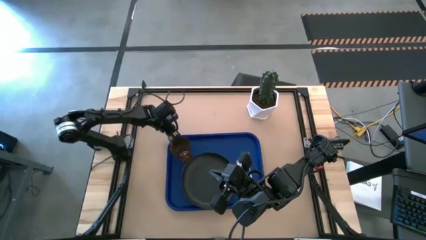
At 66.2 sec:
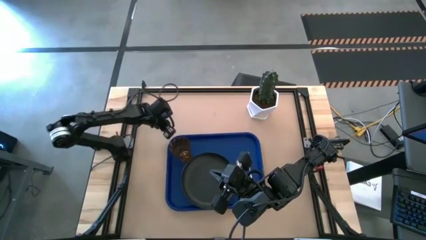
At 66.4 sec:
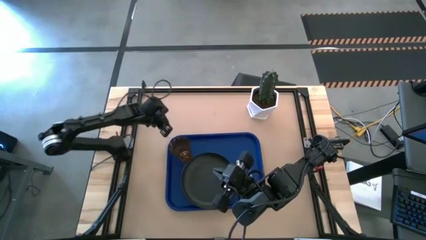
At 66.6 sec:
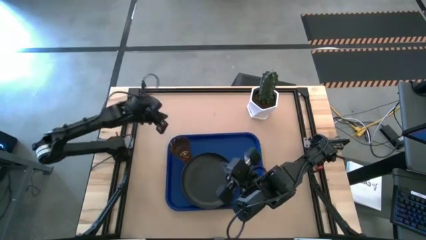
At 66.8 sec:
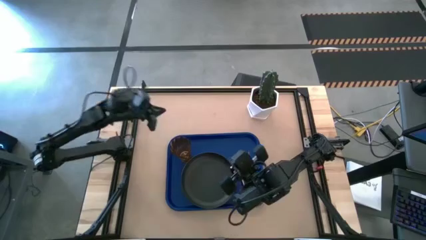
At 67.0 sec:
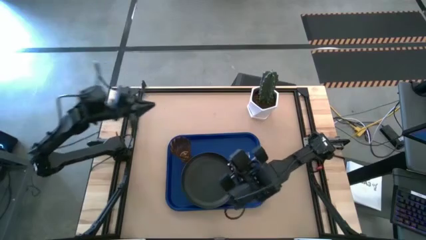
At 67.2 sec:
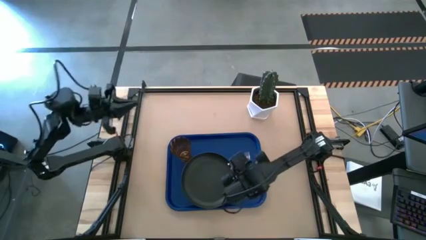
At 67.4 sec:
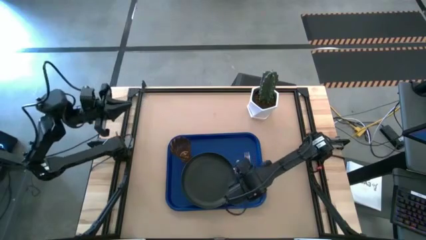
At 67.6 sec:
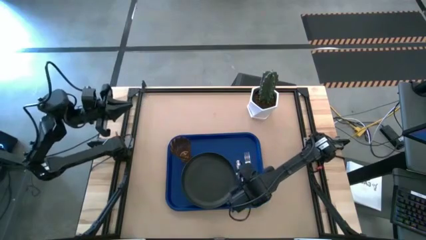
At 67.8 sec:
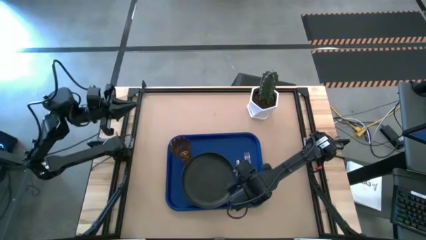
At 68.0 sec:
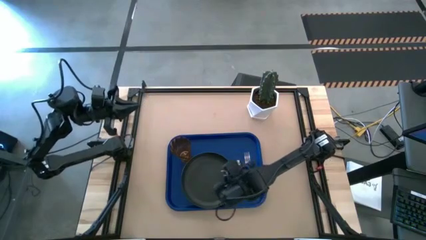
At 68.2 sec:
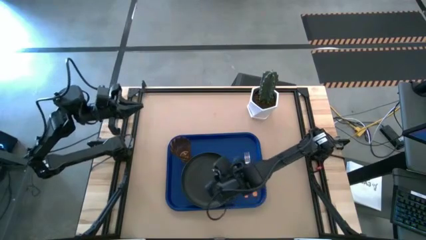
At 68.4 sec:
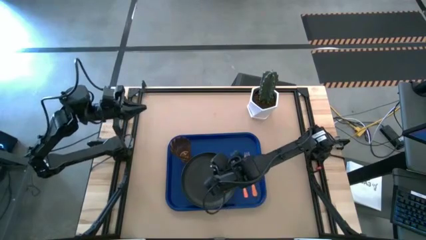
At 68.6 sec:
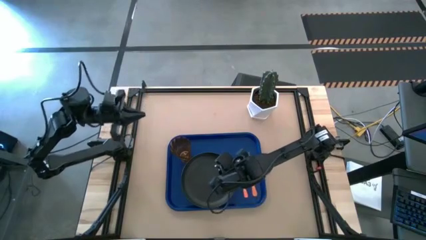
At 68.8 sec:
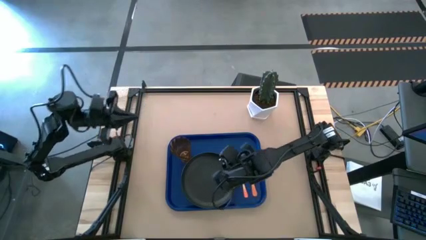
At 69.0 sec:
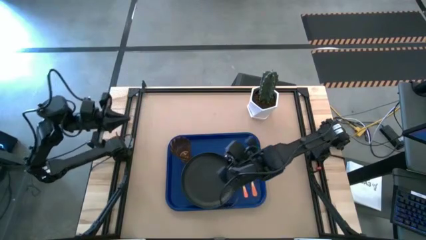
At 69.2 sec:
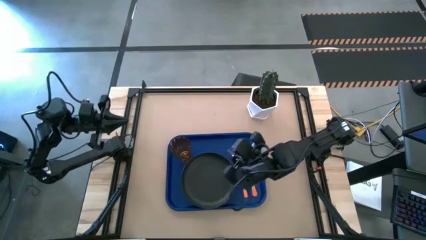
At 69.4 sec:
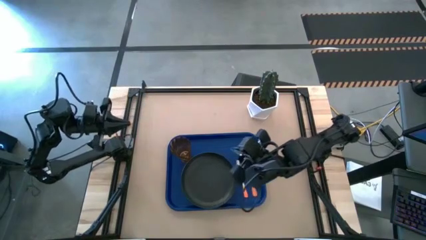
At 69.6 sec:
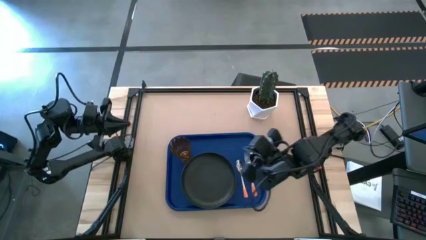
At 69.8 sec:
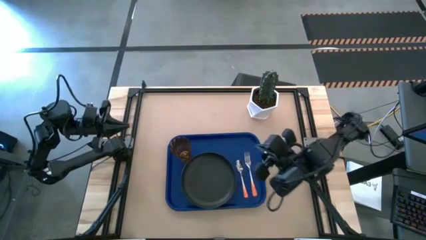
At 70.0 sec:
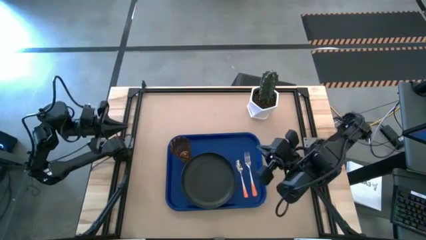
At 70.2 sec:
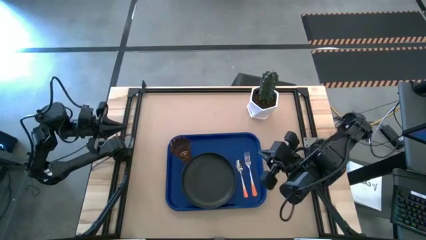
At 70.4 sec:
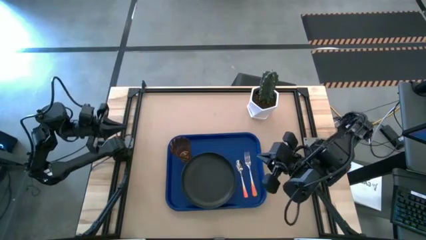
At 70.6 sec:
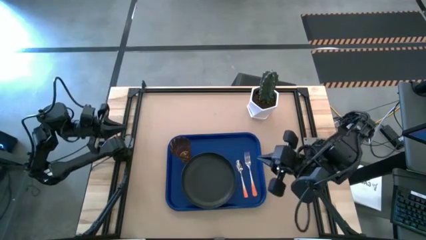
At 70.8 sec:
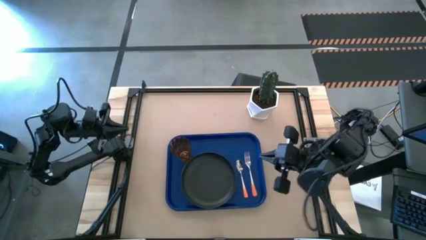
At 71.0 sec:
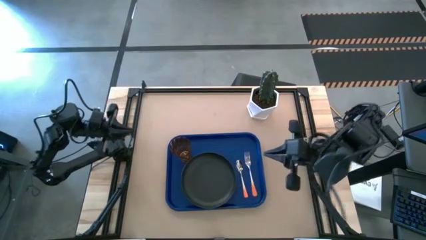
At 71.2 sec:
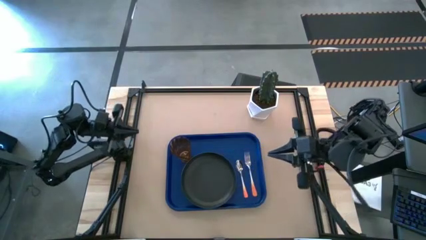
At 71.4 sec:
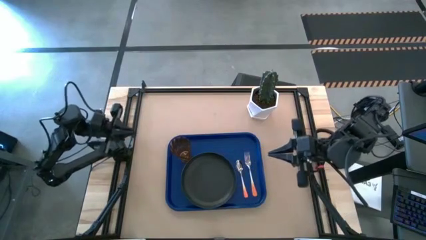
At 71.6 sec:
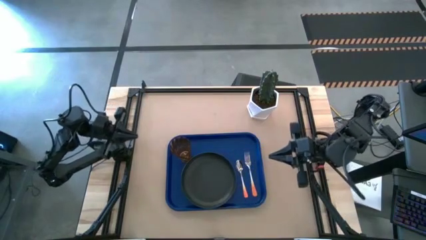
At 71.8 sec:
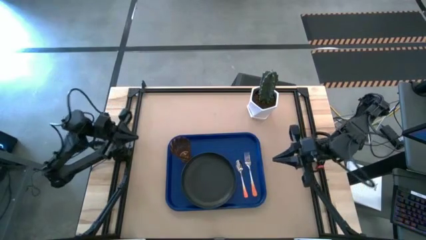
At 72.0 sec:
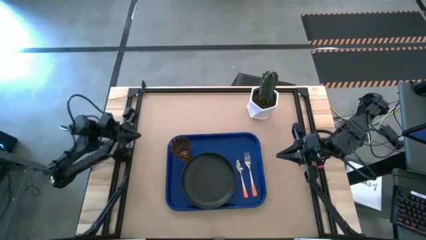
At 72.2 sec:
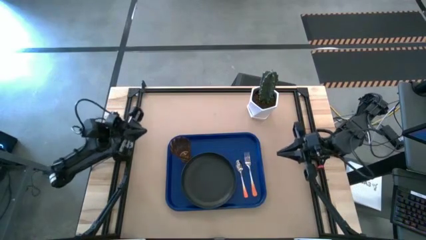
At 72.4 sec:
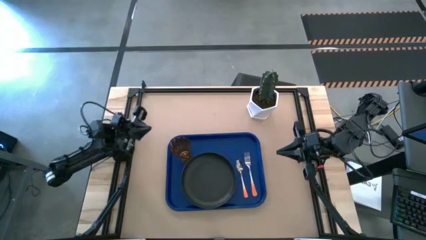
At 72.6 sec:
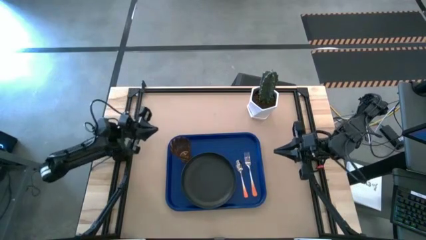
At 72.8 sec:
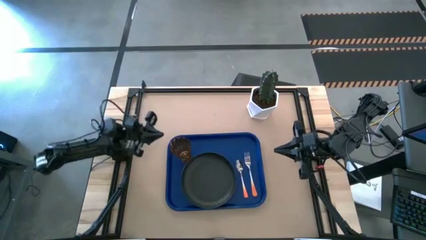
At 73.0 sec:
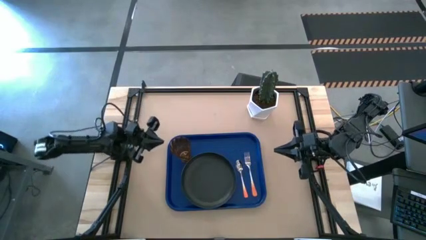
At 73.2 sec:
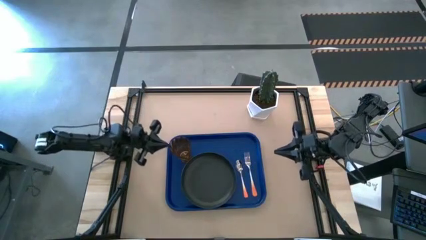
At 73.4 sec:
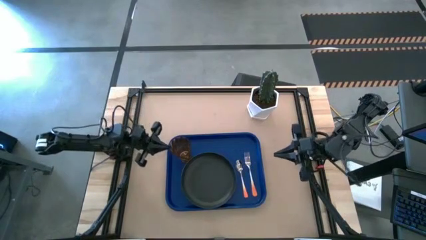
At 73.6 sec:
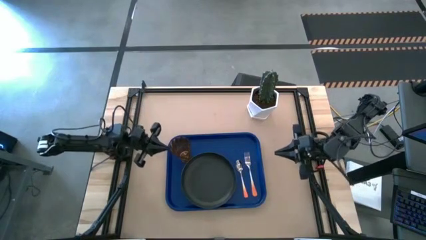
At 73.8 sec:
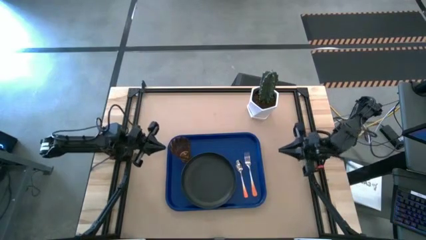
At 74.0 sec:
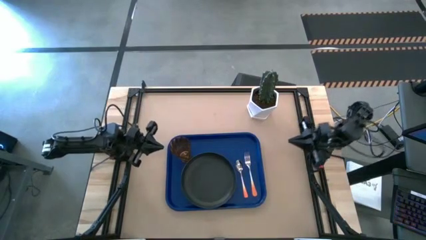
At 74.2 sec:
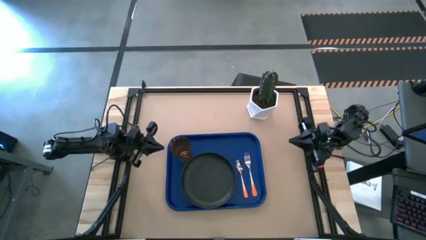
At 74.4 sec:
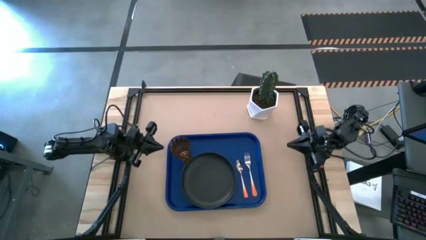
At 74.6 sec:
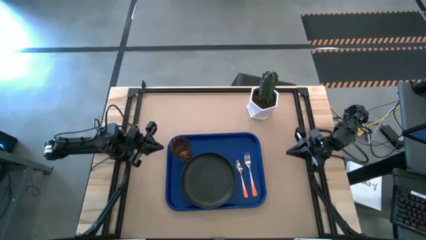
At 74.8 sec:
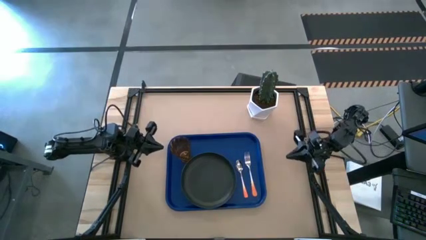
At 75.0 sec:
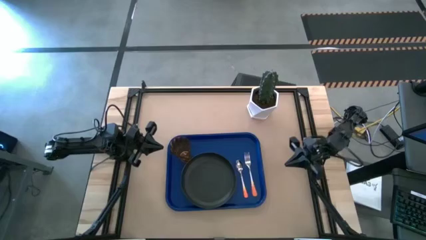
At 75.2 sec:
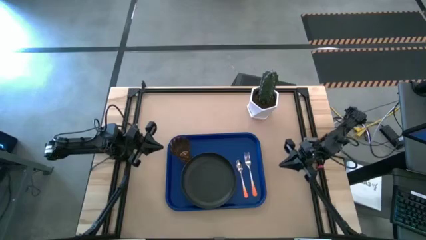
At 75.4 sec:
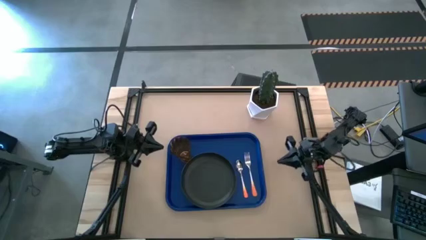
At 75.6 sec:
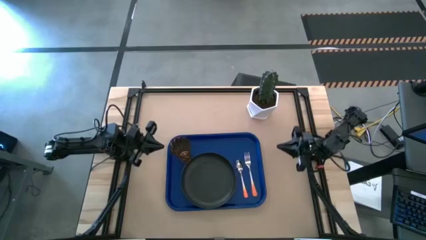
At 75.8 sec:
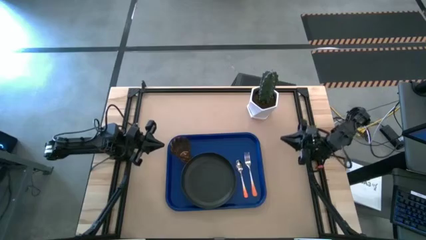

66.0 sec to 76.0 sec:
Task: Pick and place plate/cup/fork/spoon on tray
Return to Home Position

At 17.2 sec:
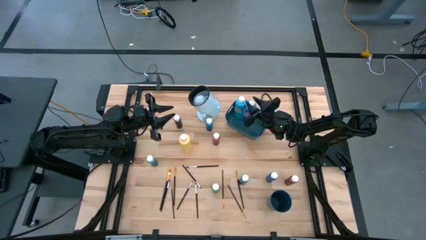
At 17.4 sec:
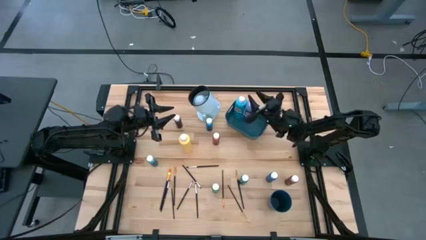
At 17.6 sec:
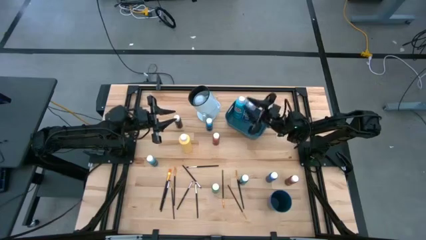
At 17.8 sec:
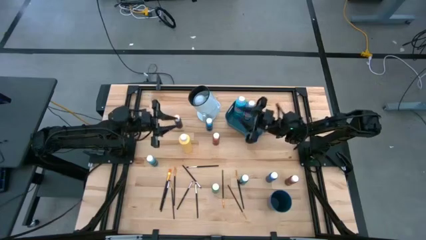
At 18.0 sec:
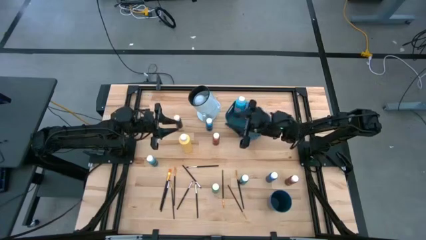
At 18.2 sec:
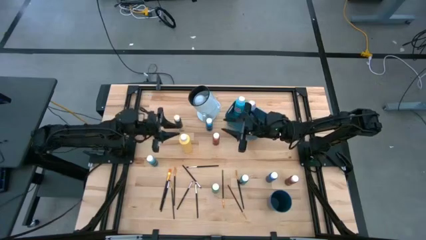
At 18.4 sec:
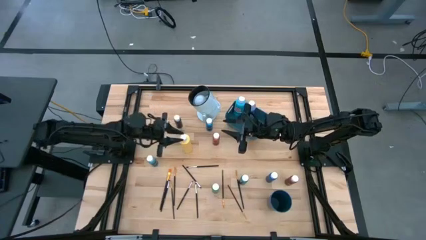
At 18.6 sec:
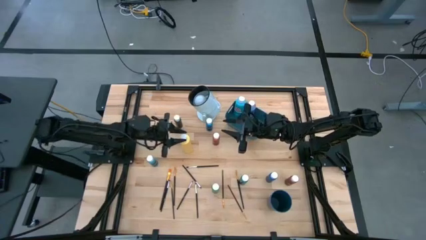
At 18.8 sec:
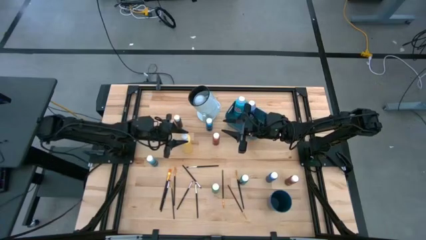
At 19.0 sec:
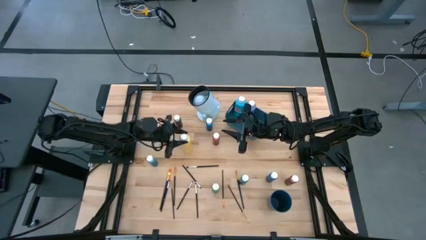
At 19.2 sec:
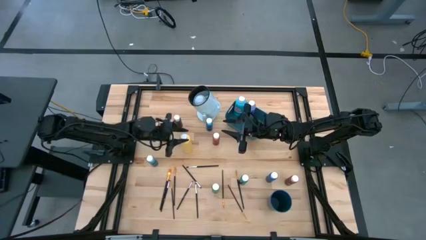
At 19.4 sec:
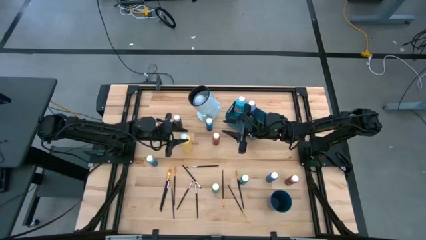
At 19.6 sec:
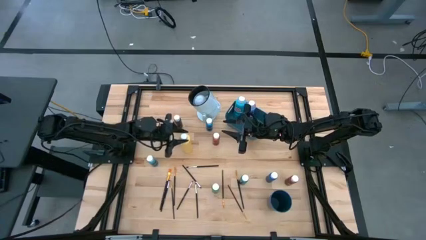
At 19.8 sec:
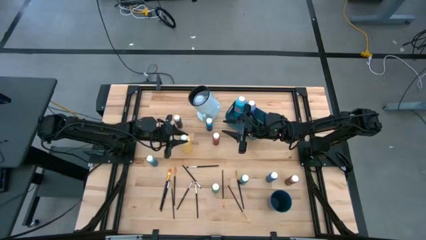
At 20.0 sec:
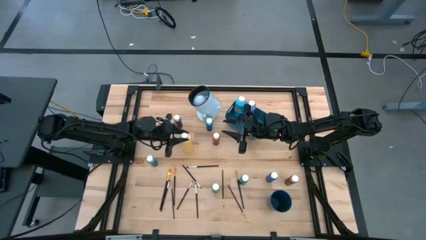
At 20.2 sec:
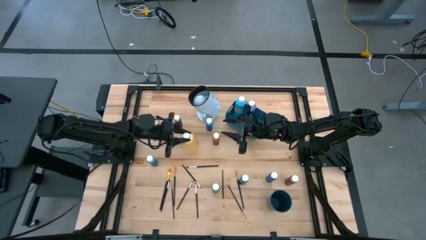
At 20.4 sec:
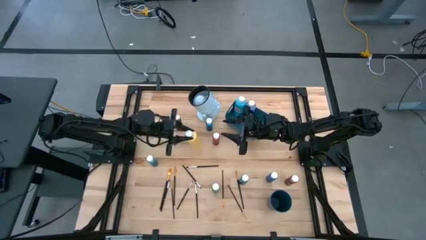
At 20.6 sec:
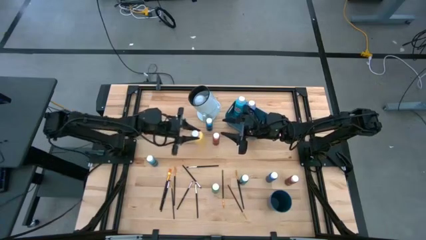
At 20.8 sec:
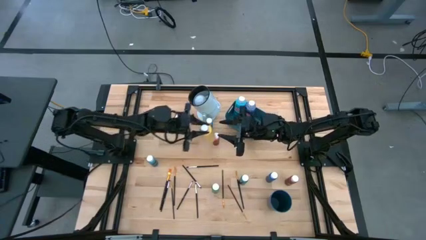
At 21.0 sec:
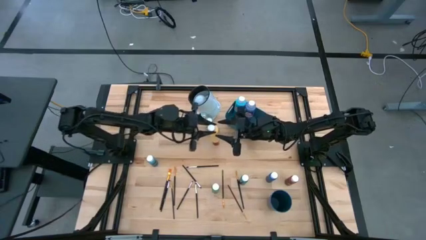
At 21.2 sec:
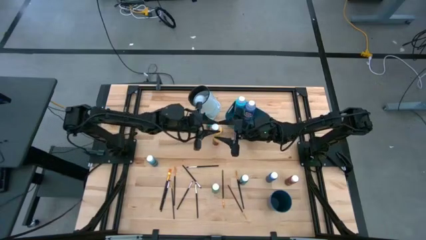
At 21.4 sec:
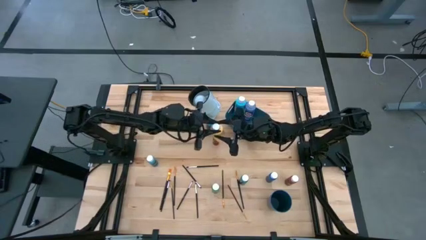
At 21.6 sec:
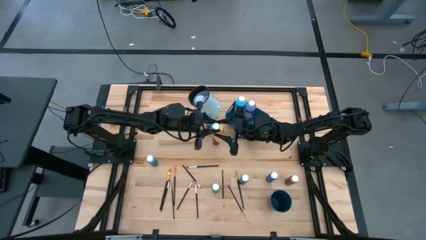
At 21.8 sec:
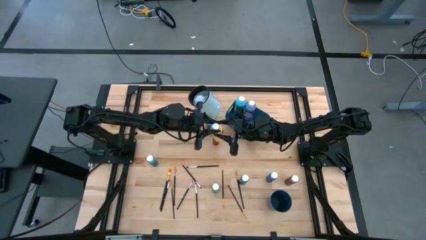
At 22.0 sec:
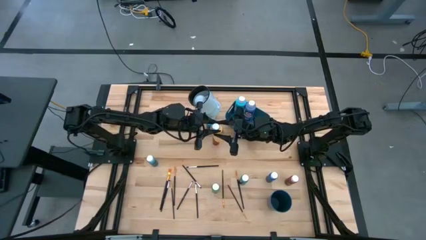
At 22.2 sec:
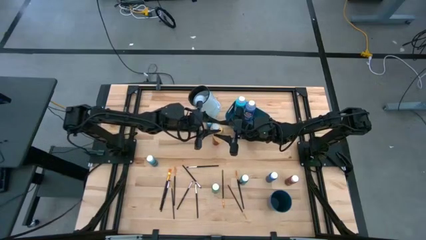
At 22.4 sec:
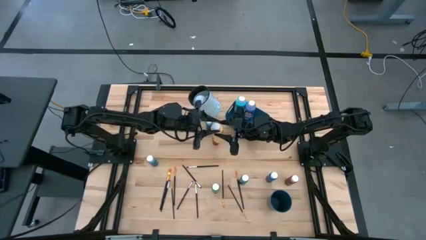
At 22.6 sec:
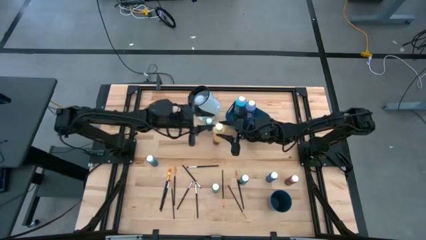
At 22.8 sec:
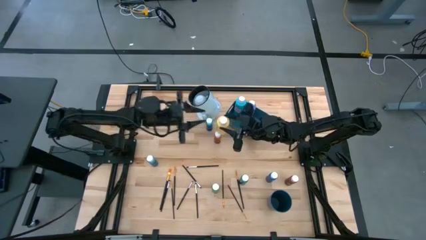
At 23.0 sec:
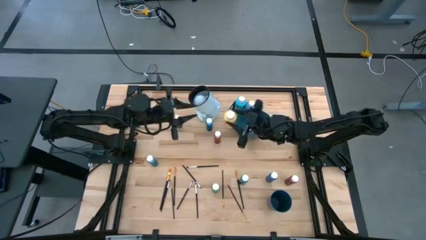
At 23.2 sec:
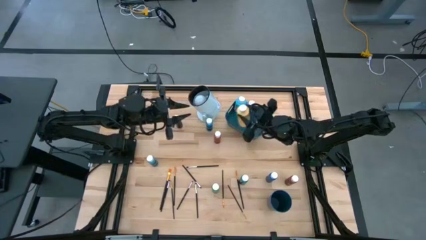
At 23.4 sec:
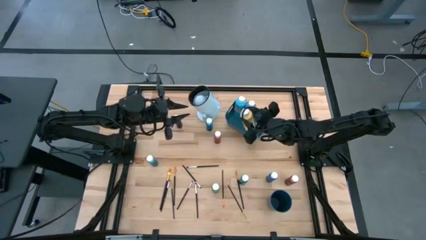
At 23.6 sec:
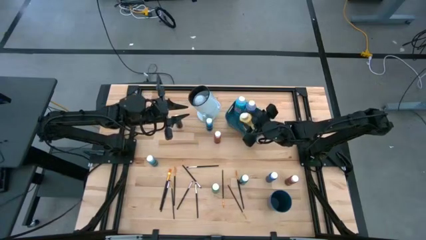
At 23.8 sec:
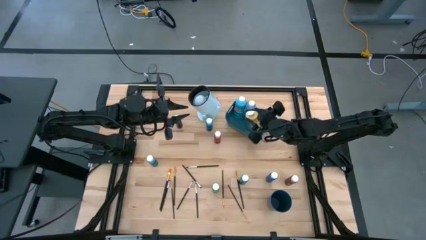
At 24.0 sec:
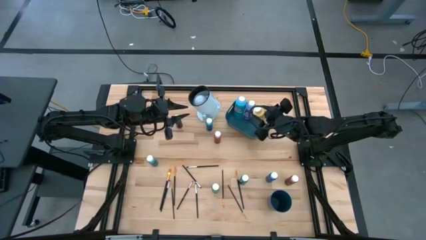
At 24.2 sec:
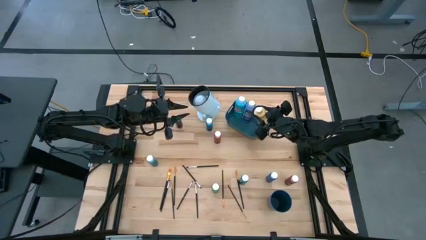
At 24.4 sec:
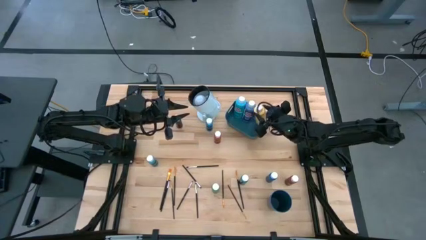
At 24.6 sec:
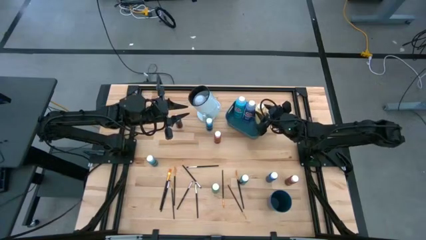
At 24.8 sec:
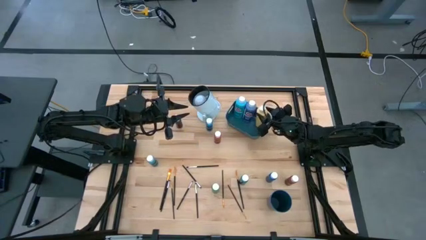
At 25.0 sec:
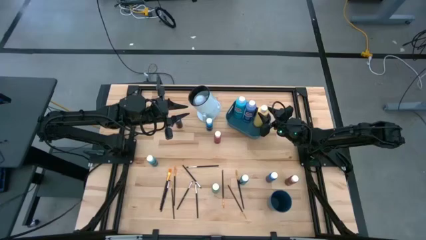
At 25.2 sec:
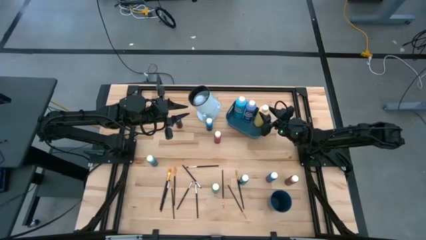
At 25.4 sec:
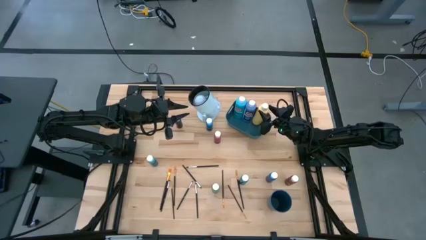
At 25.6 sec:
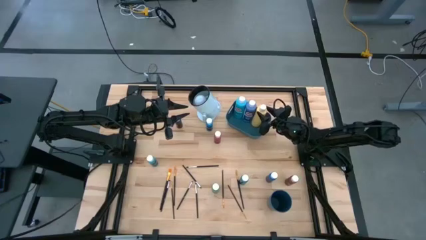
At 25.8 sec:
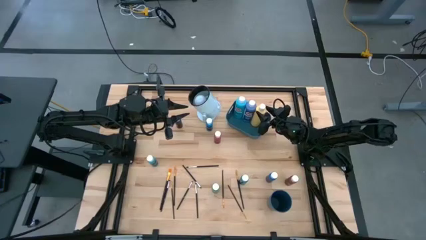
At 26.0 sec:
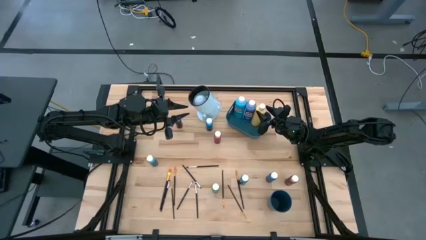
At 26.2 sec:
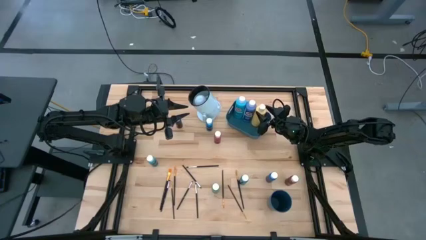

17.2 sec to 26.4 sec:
Task: Pick & Place Paint Supplies
Put the yellow paint bottle into the blue bin
